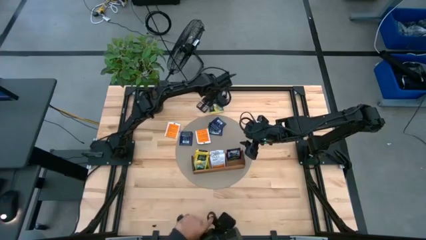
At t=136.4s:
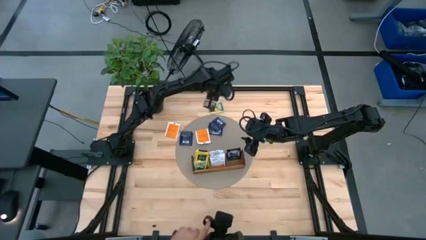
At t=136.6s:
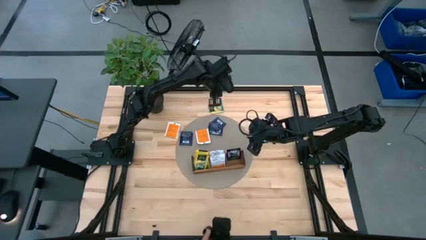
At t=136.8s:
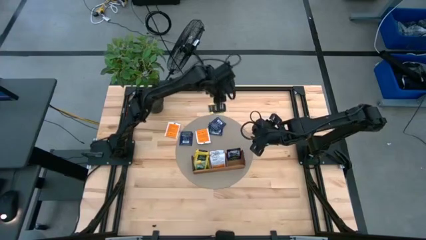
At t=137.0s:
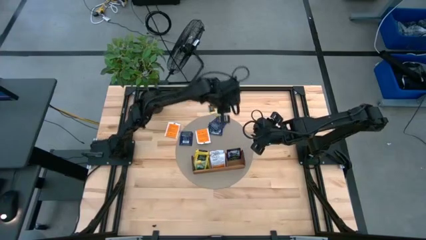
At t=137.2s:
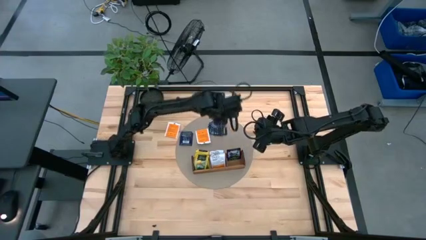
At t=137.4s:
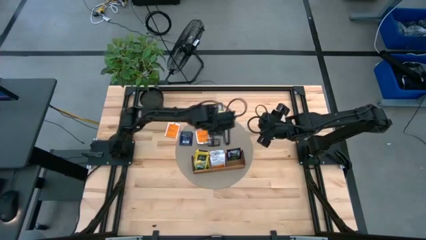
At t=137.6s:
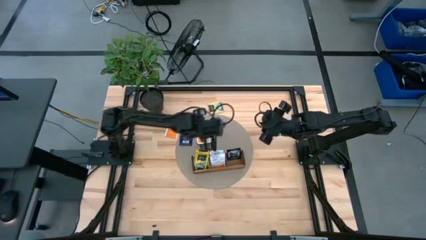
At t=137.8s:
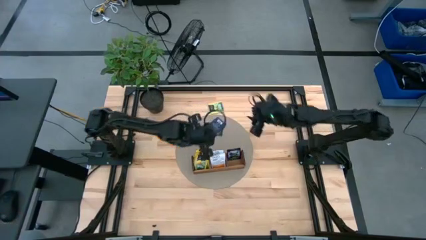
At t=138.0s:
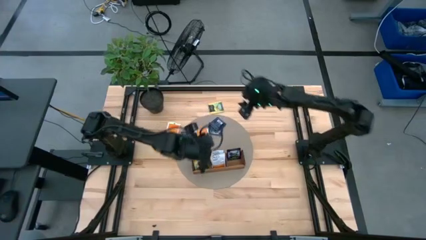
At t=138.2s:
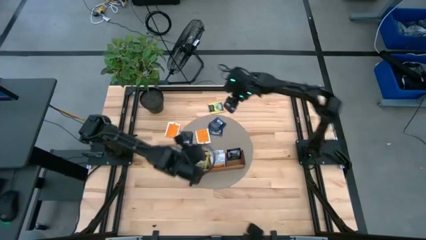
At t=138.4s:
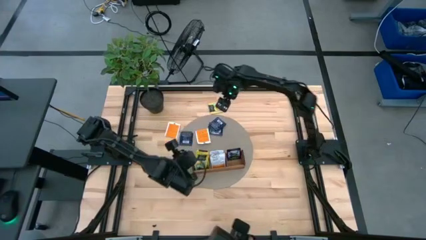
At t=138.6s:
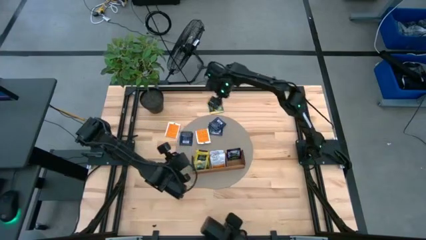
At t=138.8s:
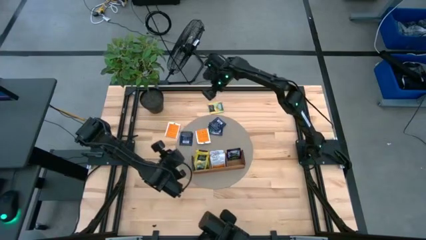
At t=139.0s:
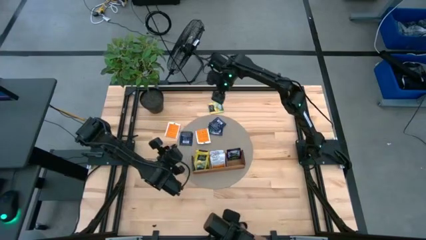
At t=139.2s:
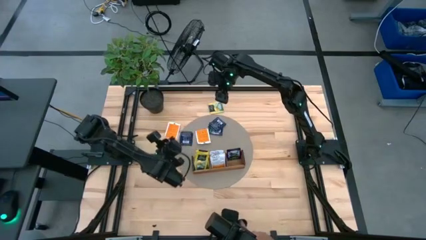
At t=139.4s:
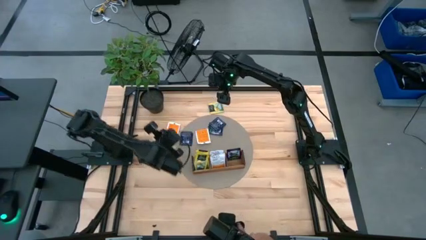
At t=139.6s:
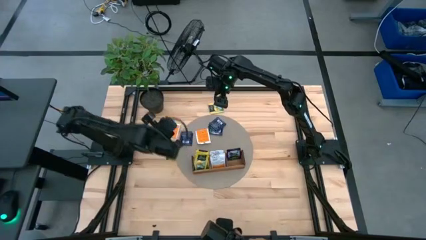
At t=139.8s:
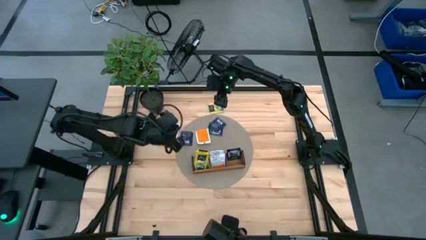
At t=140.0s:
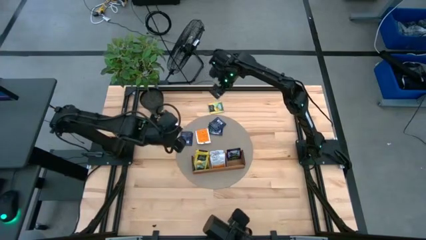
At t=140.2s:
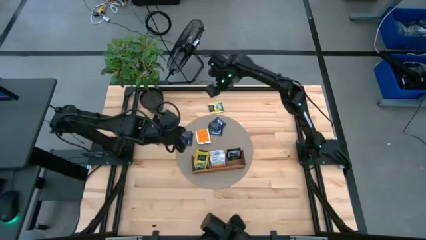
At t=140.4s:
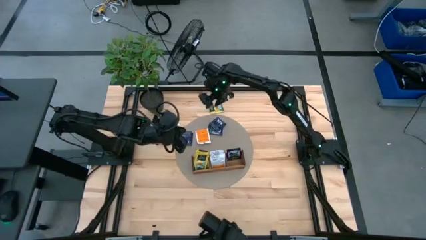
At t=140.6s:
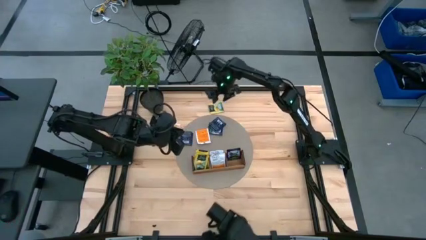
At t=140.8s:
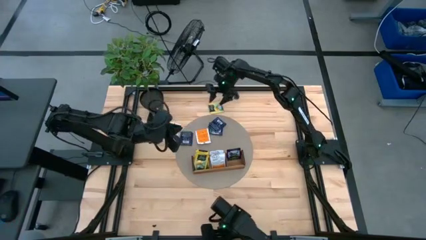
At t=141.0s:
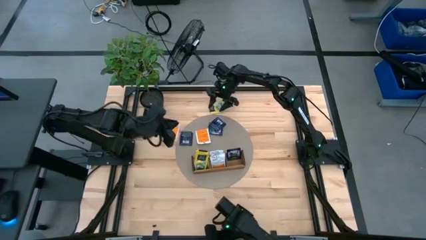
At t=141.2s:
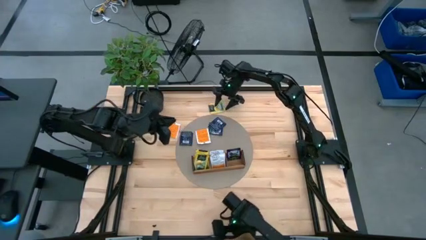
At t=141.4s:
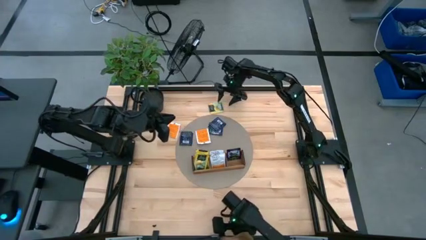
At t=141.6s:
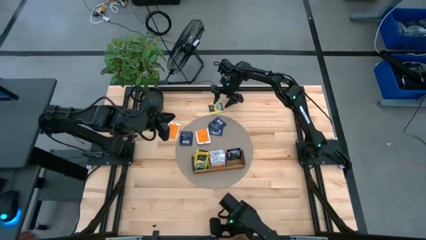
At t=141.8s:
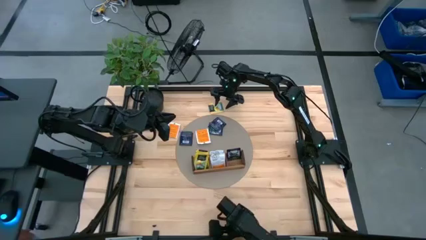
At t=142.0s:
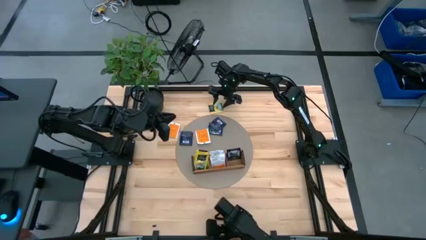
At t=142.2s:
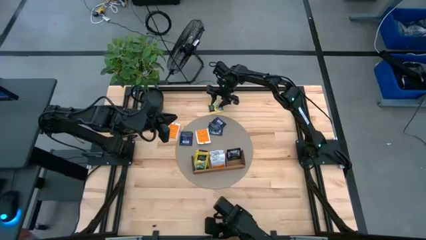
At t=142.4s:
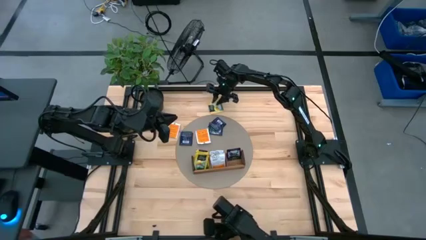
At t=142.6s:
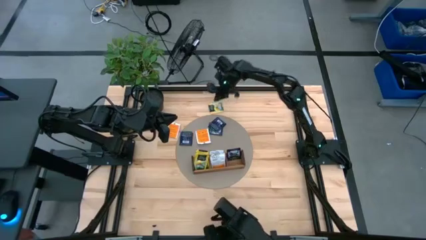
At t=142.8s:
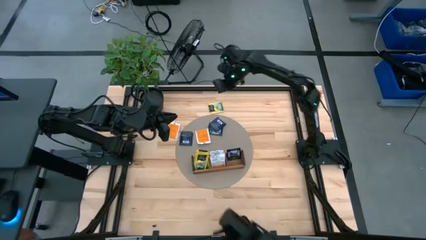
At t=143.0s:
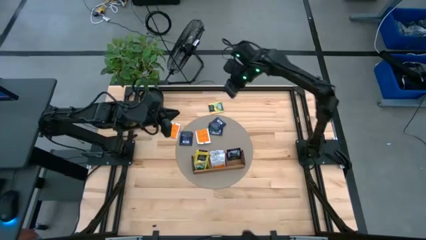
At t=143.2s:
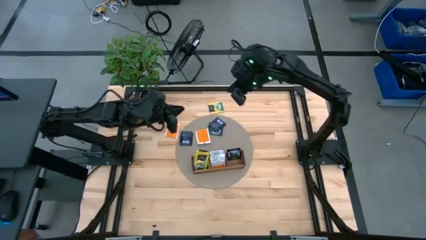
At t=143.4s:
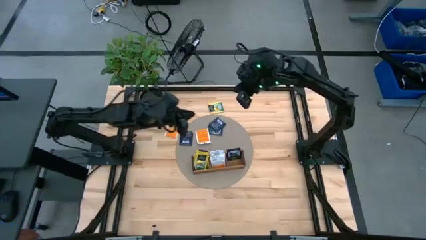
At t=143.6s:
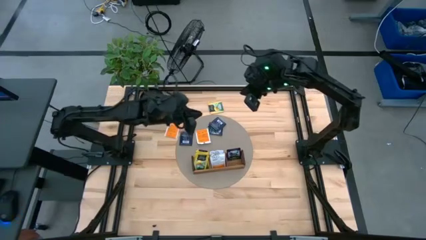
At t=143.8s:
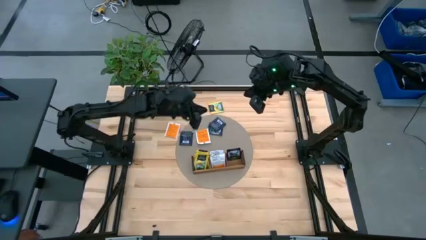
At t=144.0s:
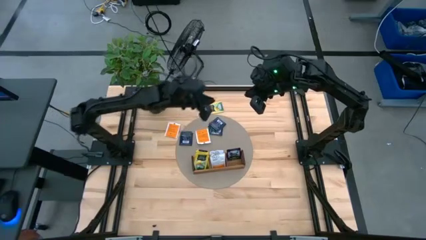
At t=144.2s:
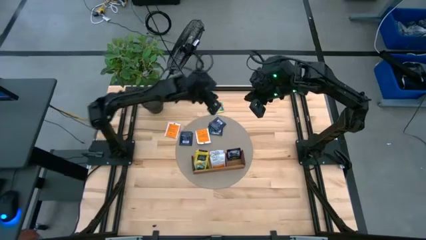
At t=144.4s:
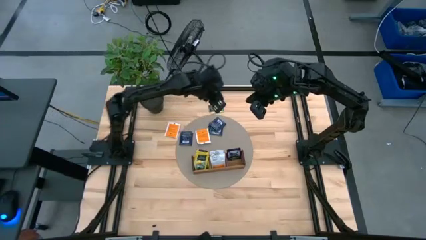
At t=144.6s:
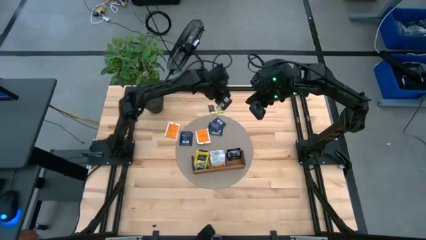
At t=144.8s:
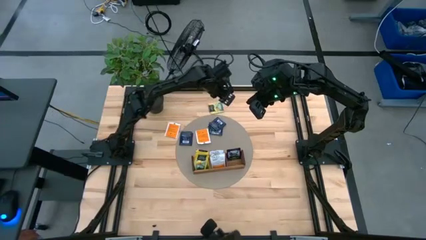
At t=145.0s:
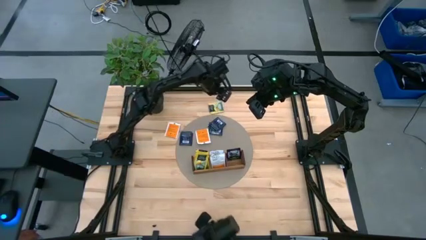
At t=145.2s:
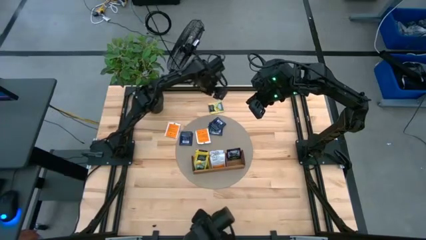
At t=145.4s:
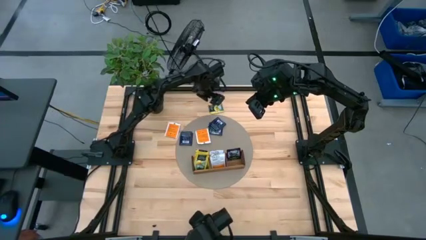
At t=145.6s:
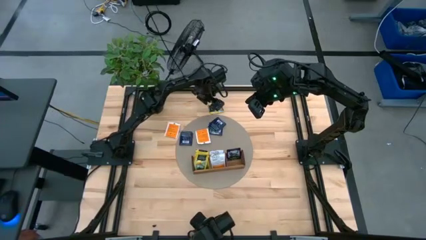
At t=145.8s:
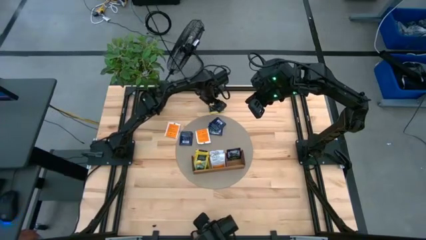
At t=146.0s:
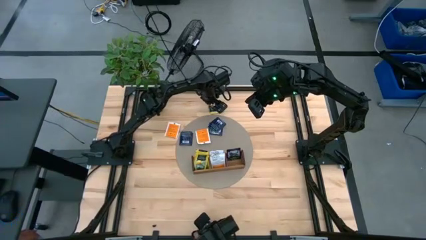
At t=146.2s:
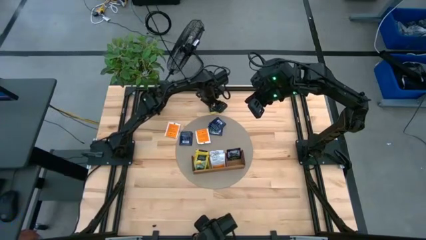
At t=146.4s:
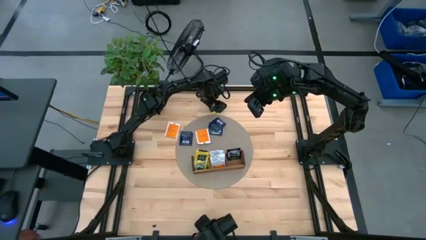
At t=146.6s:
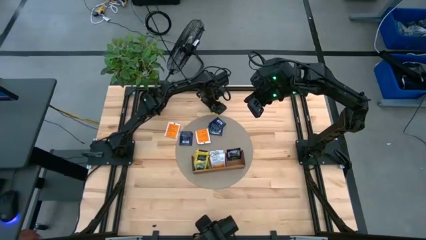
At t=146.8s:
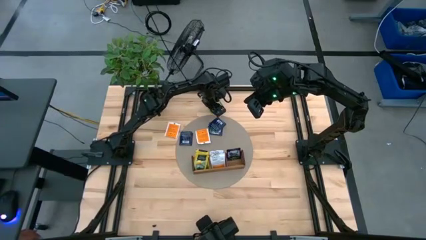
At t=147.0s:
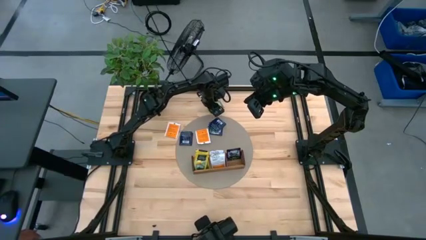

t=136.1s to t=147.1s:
Task: Pick & Place Tea
Put the yellow tea bag into the left section of the wooden organizer

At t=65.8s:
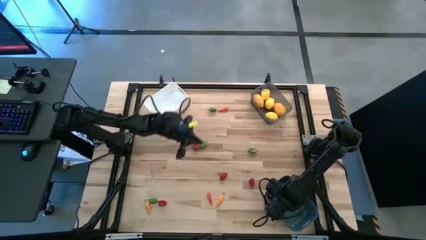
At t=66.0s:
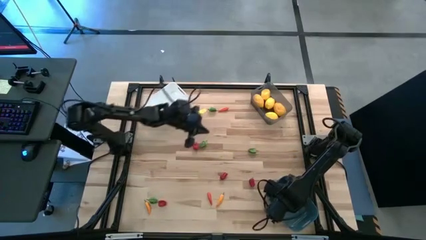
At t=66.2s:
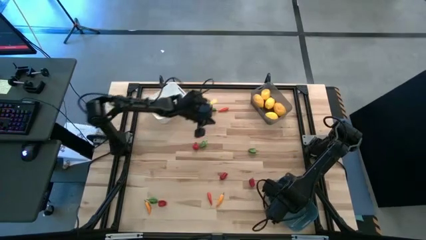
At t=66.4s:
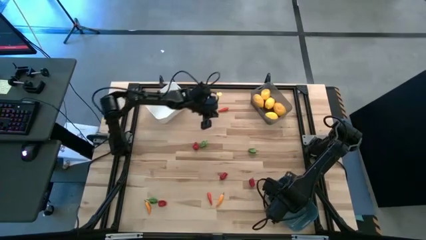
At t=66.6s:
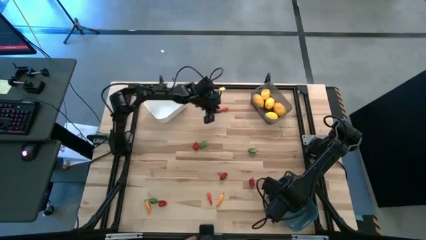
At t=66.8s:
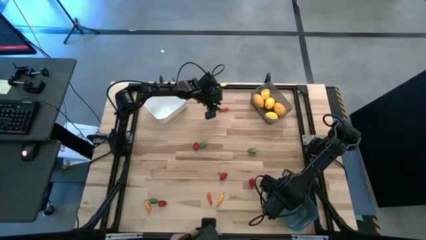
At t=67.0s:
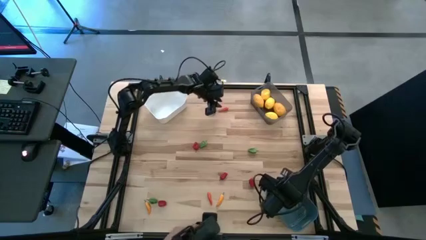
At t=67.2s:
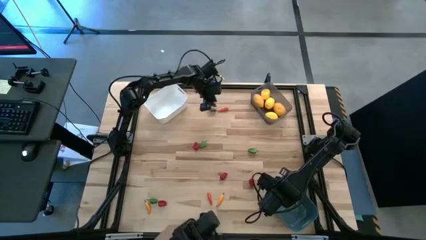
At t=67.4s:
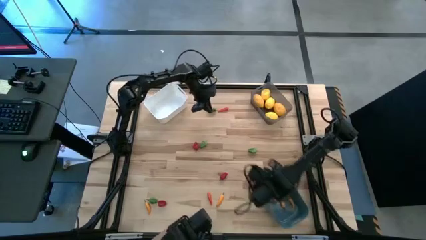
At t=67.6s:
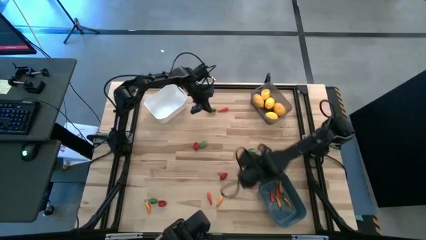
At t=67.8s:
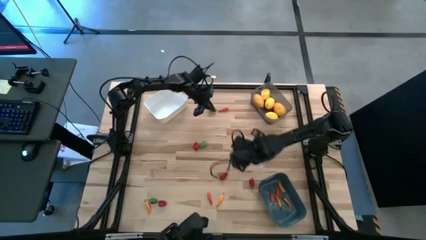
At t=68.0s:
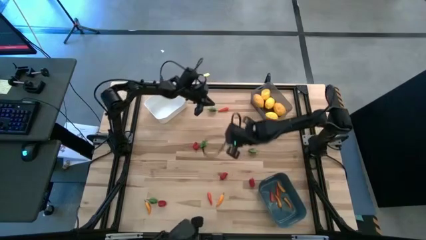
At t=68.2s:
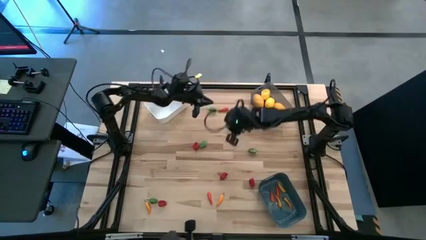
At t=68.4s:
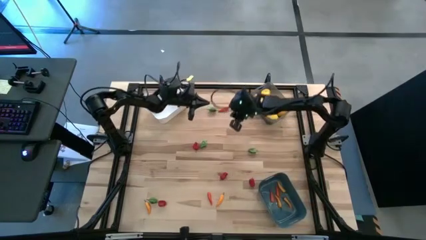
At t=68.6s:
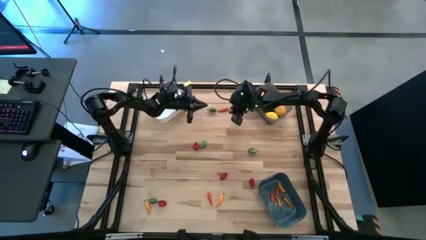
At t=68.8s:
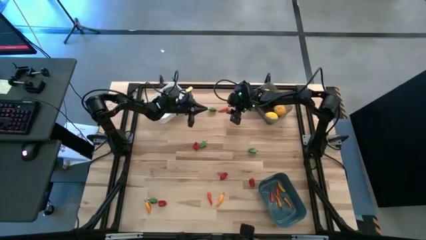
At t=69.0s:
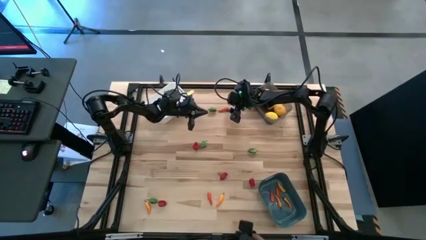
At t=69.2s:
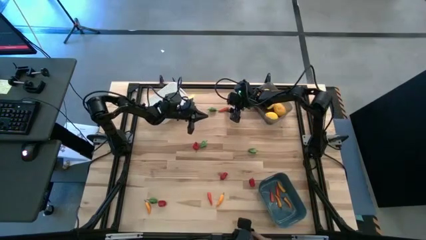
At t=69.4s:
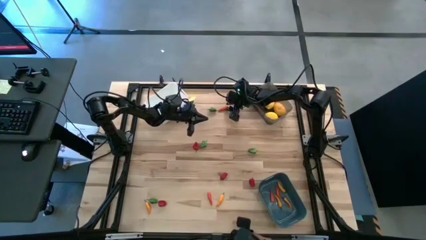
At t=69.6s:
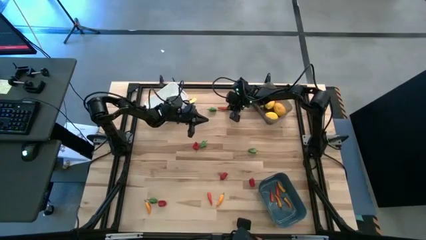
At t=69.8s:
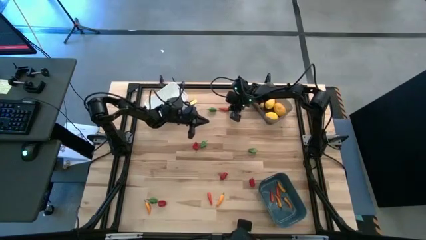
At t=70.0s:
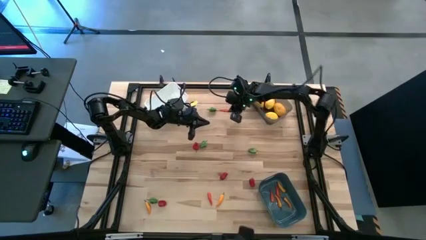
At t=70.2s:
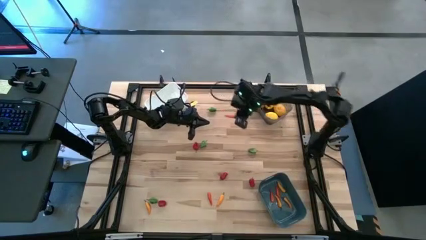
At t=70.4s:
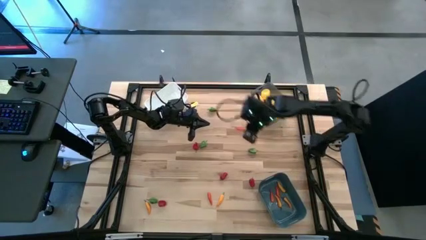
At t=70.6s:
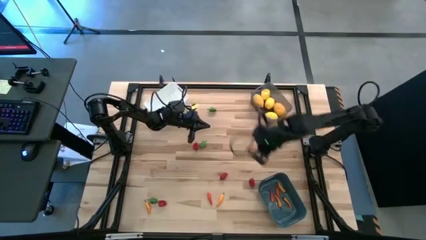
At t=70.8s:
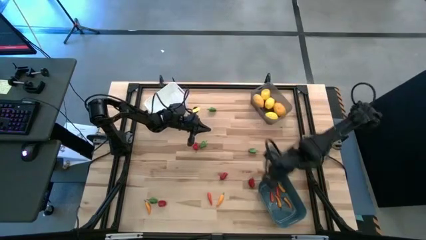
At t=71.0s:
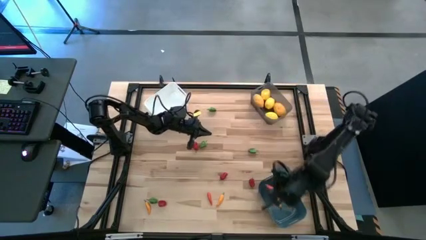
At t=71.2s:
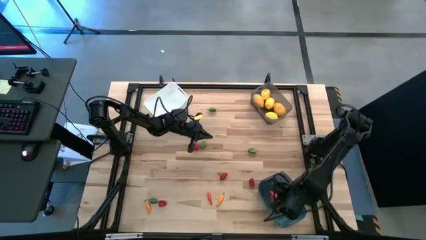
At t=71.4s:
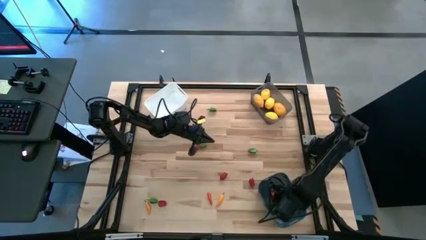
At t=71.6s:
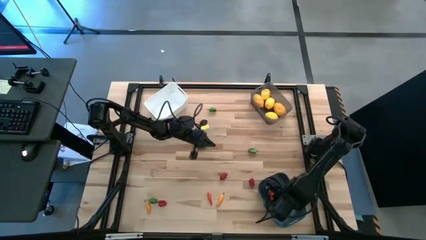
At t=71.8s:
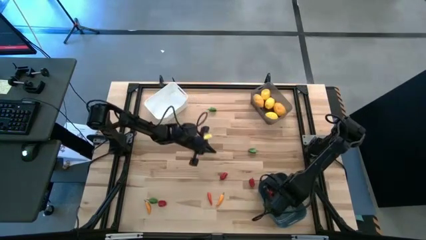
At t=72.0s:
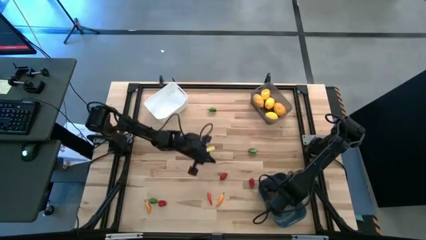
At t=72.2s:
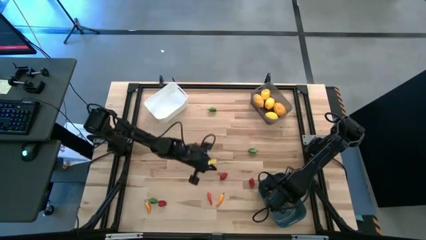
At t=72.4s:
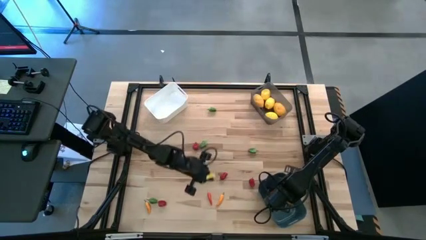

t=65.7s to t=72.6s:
Task: Sort produce into baskets
Put the orange chili pepper into the blue bin
